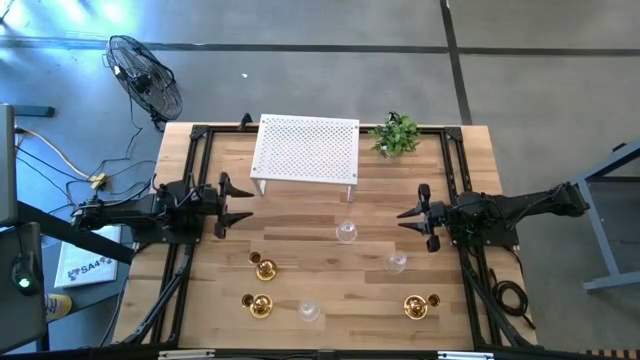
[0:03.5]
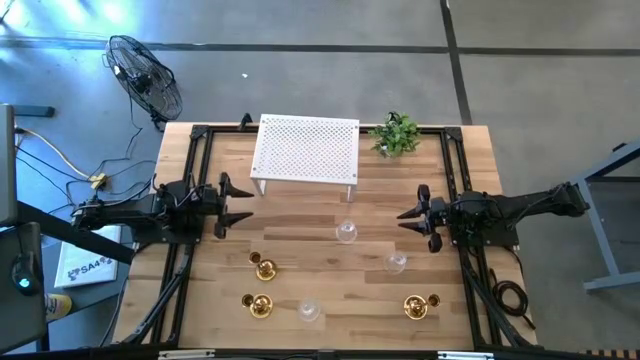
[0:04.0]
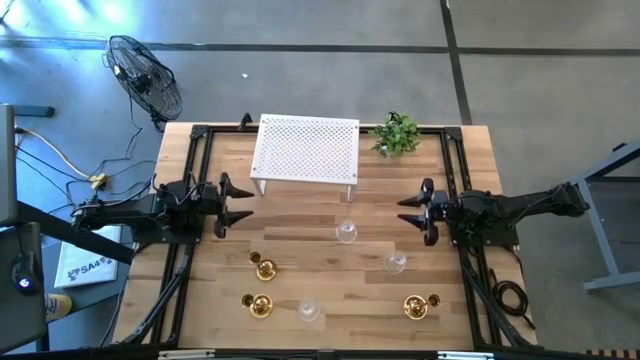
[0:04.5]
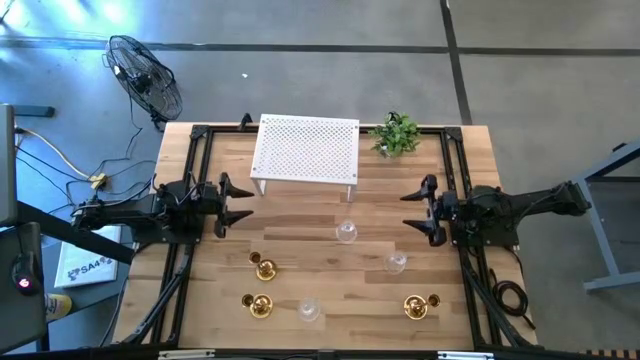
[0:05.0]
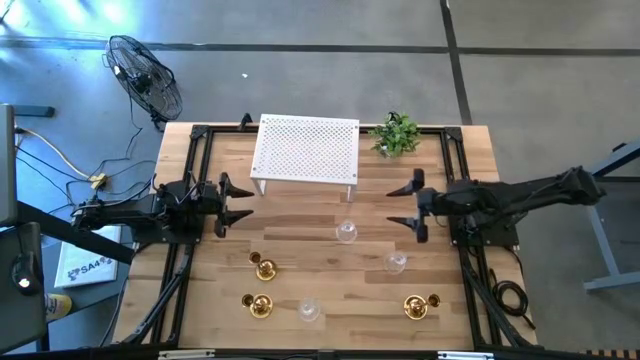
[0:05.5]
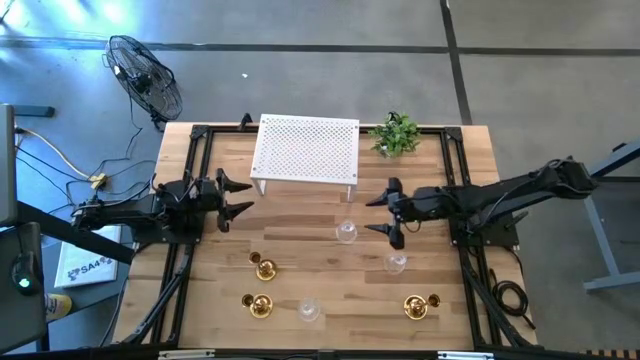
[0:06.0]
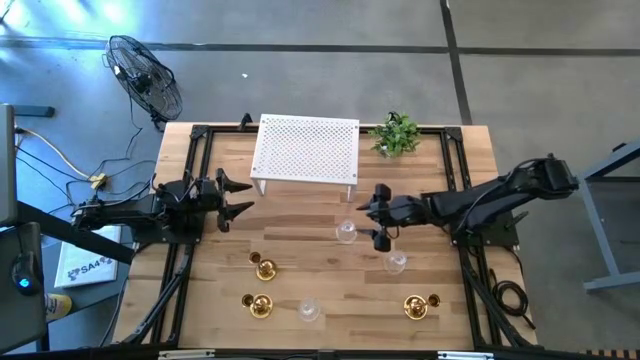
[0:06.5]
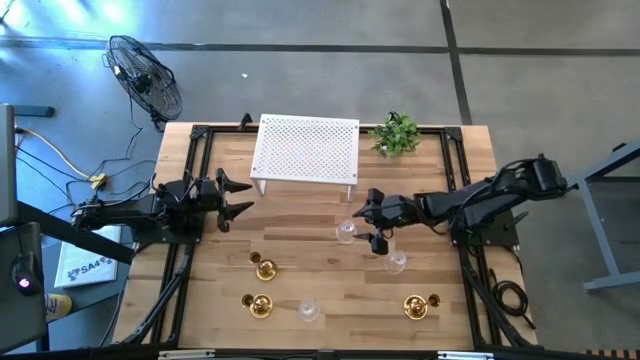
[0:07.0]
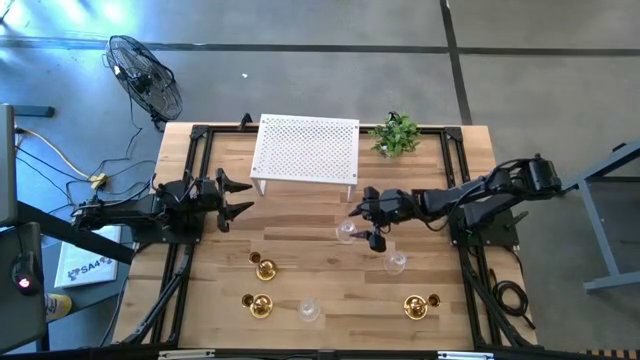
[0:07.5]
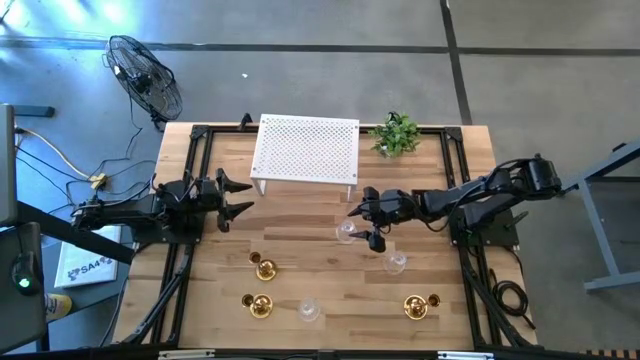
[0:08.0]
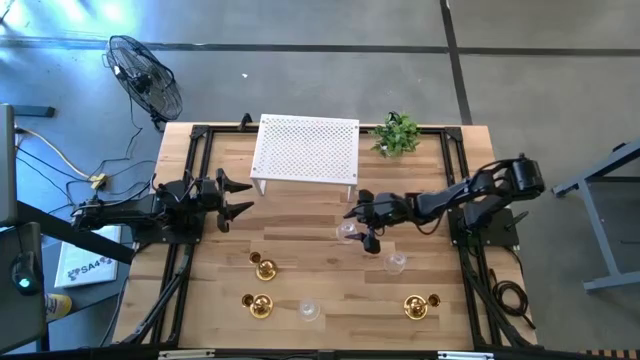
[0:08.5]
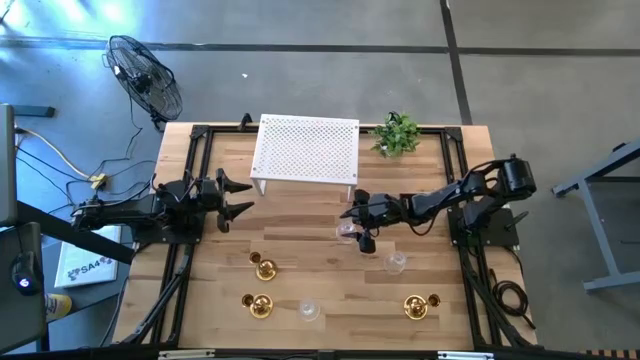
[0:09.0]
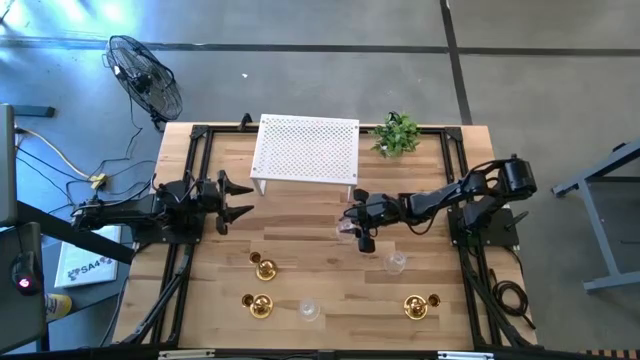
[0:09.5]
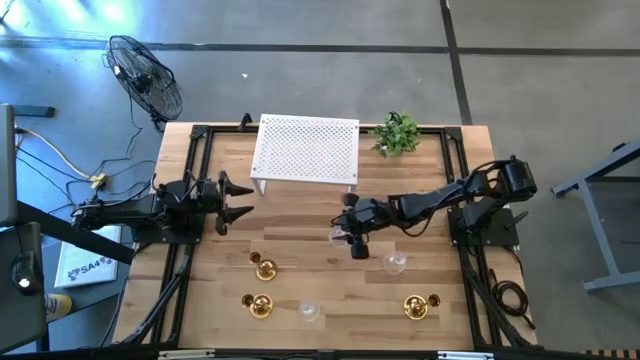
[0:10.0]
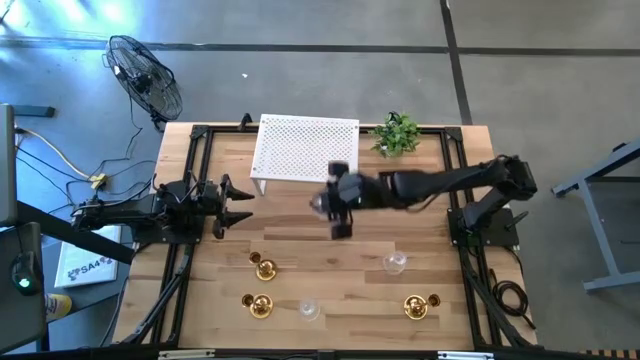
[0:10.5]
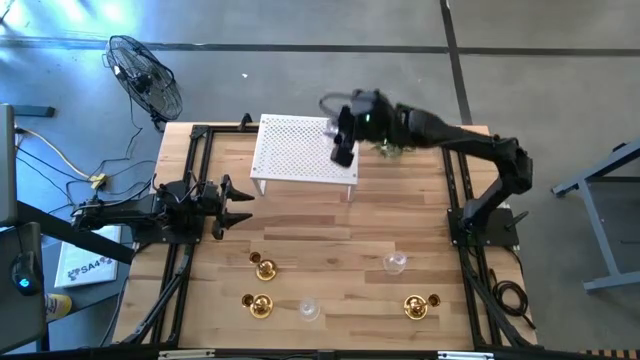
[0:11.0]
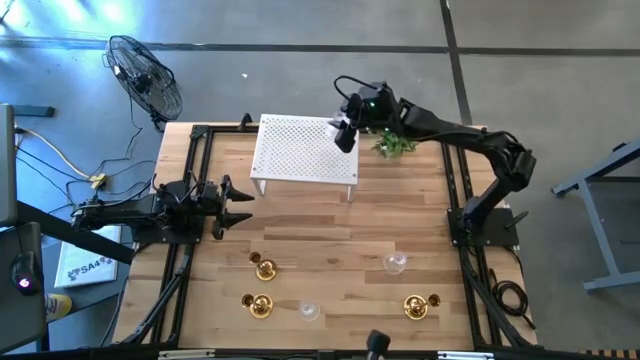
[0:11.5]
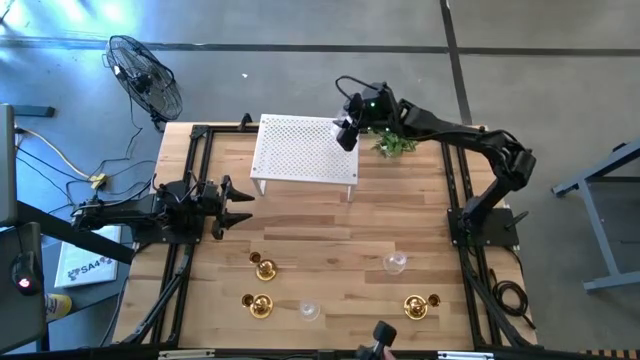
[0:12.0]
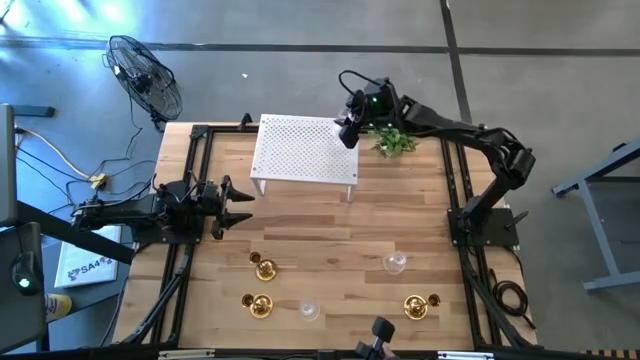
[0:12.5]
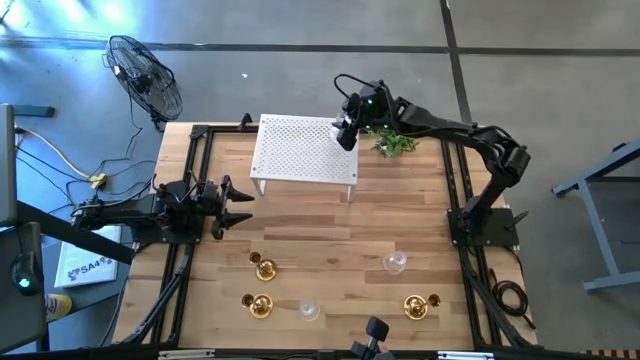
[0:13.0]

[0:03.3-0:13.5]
Task: Pick & Place candle stick holders
Put the top transparent candle holder on the shelf

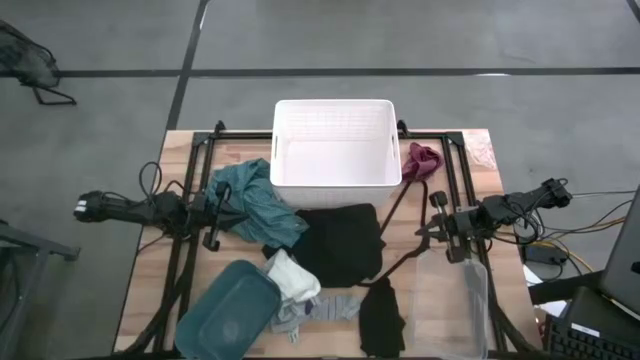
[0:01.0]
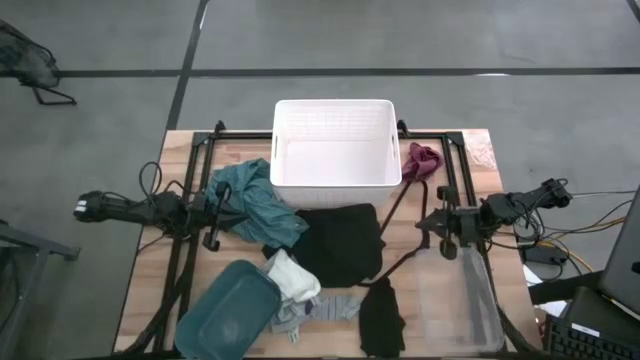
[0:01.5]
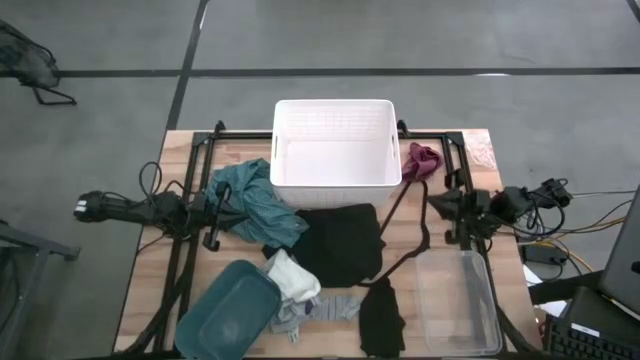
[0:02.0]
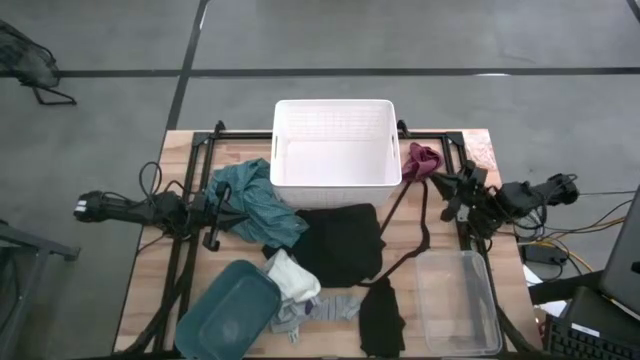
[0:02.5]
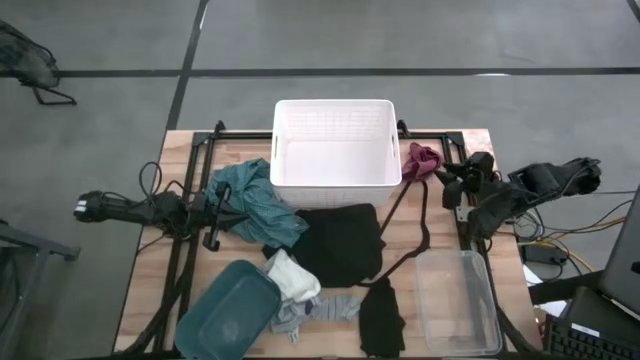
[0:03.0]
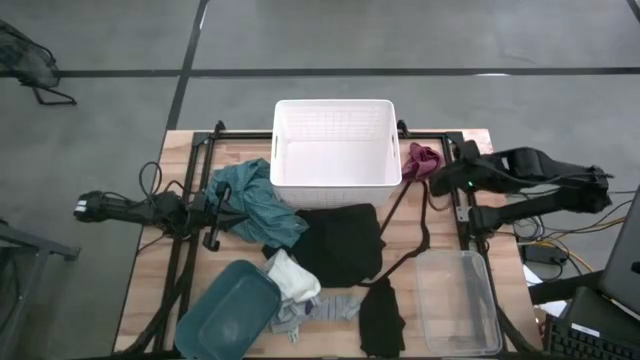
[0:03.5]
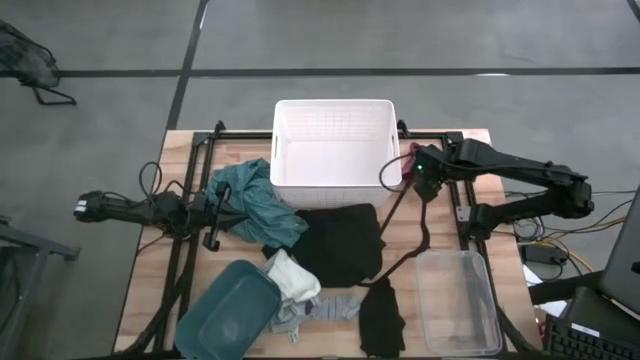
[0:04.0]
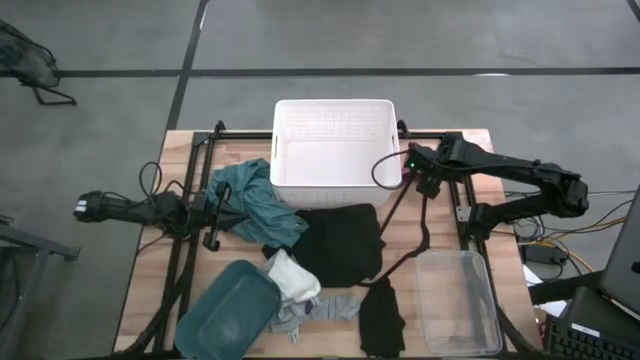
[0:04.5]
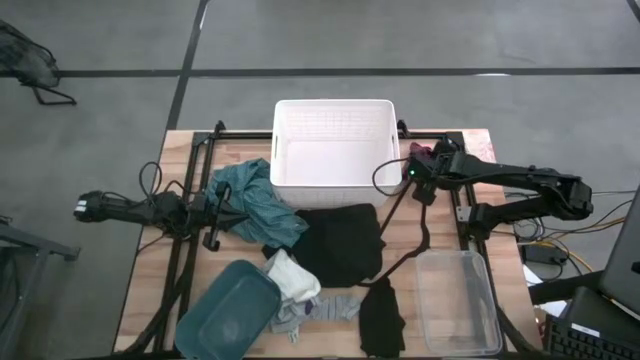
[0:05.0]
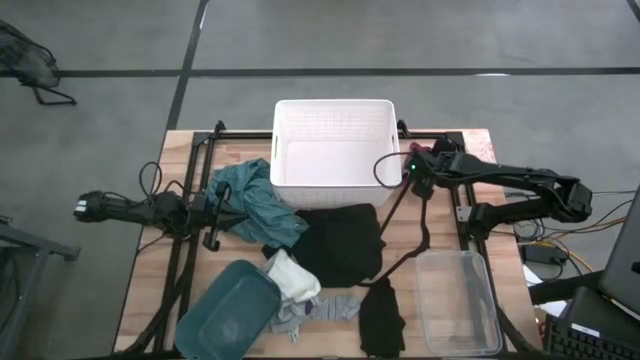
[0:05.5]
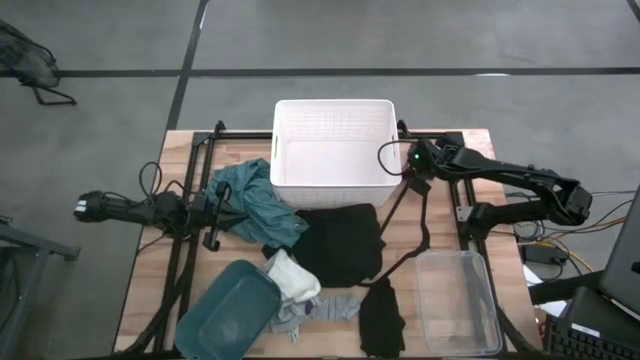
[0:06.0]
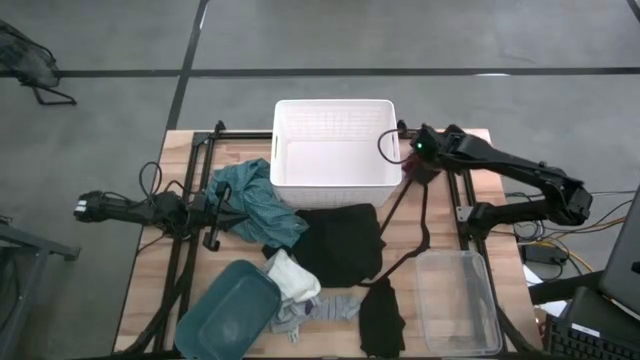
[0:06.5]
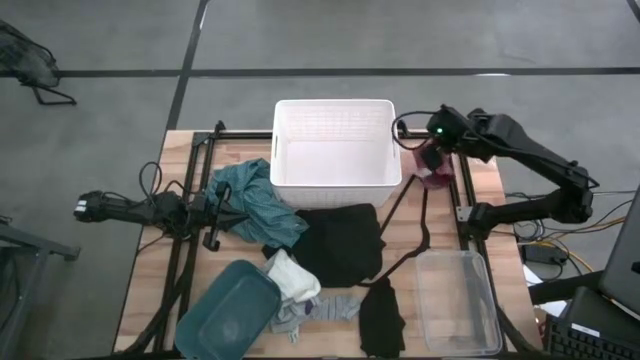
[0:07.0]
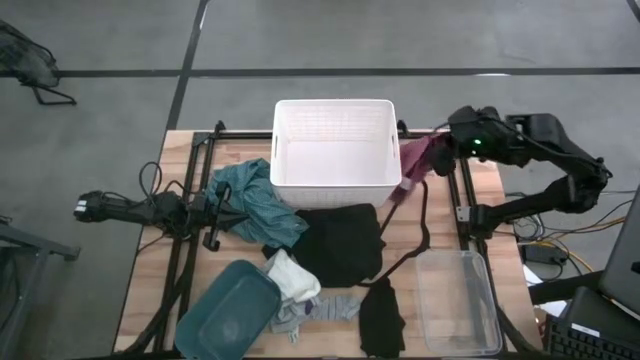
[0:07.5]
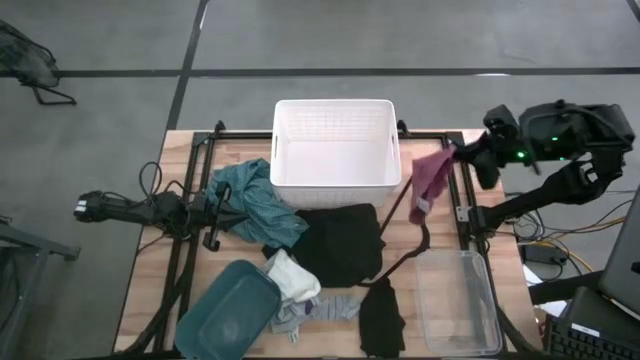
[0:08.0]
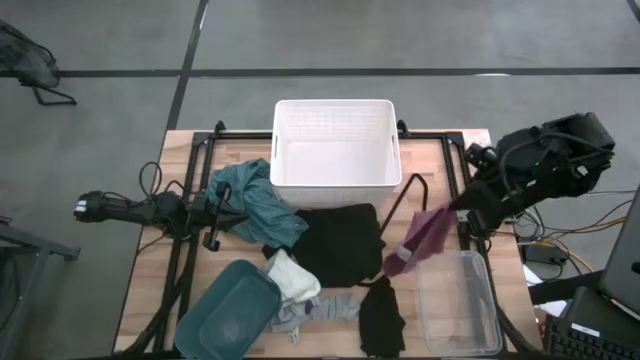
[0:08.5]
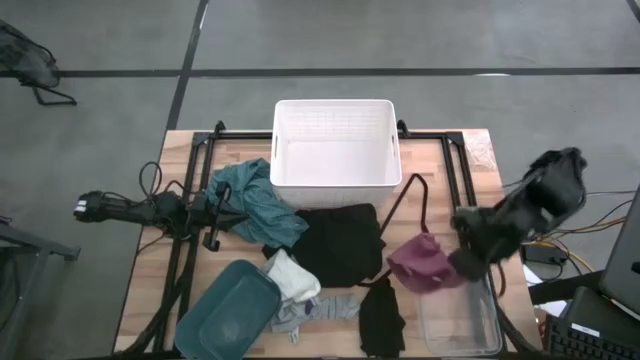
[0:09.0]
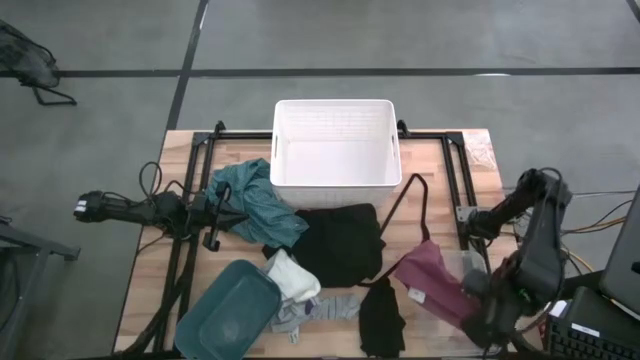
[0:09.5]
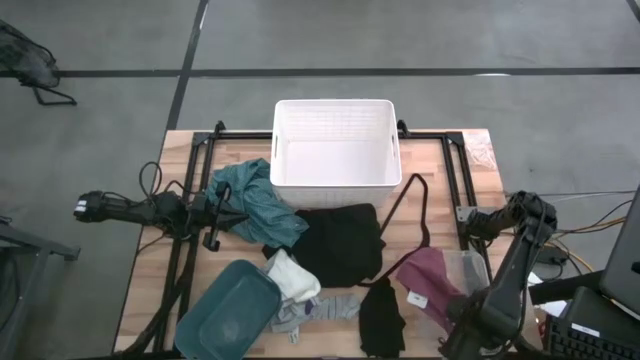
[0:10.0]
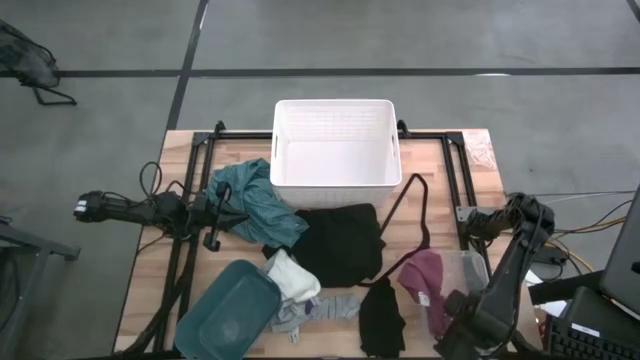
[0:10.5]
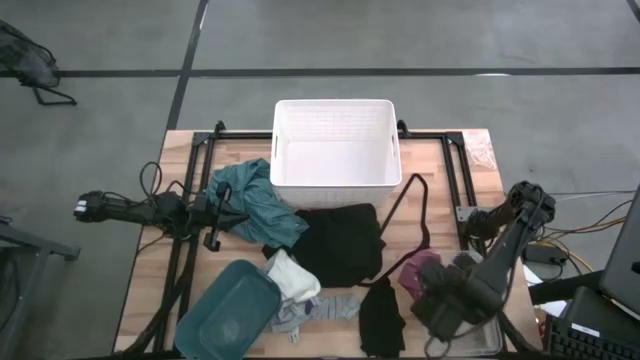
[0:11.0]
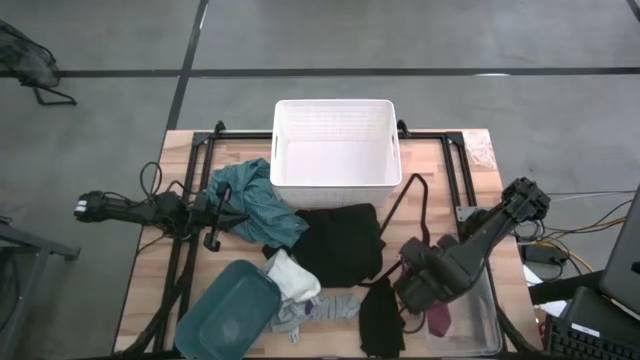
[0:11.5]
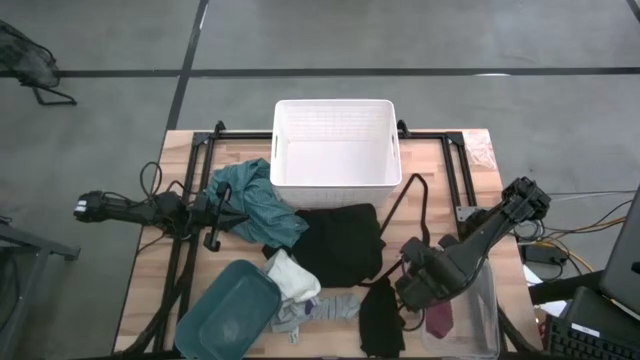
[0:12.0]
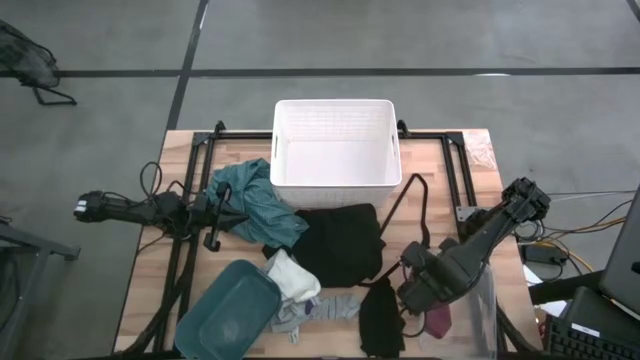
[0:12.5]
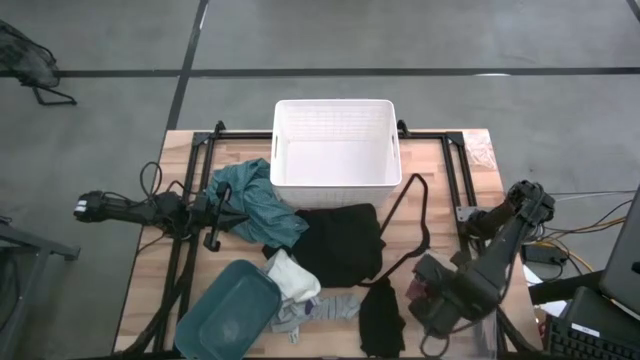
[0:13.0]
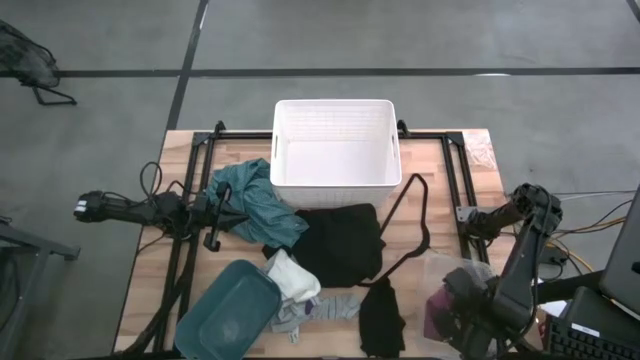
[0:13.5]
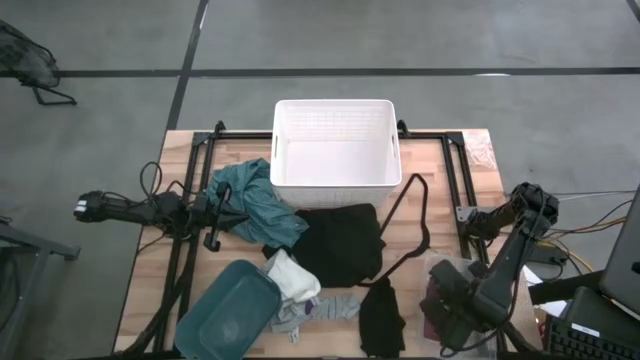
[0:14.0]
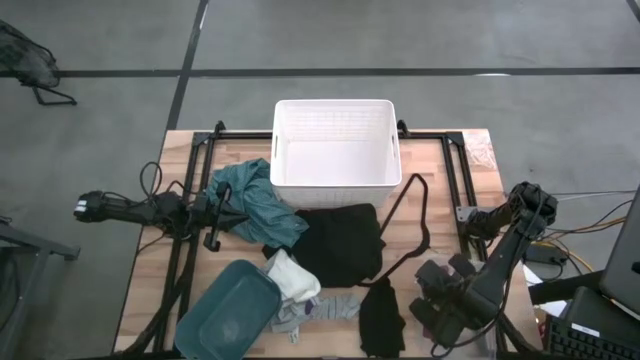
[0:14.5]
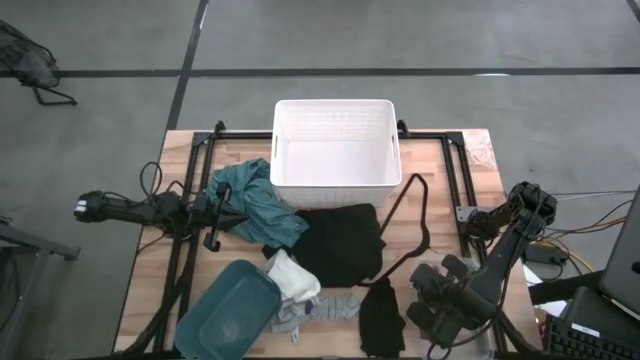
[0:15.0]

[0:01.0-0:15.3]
Task: Pick & Place Cloths
Put the red underwear into the transparent bin
